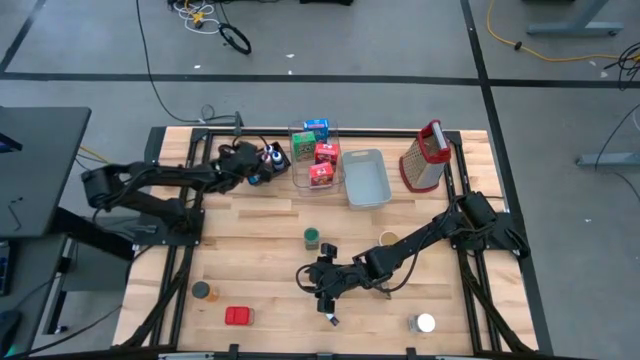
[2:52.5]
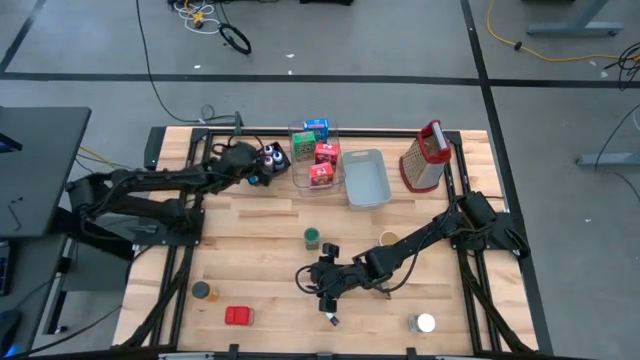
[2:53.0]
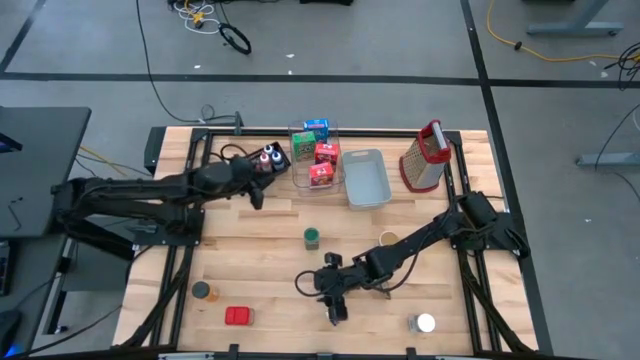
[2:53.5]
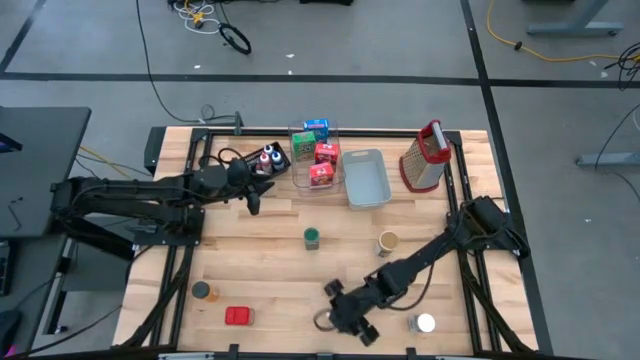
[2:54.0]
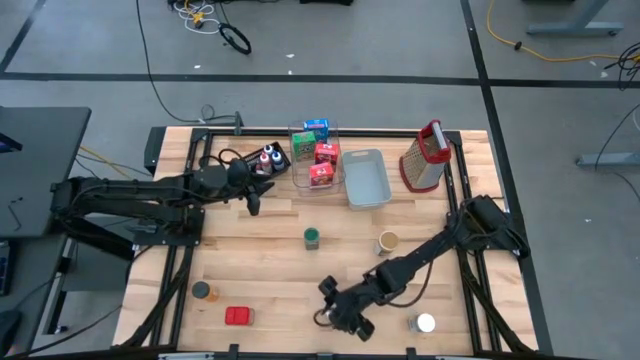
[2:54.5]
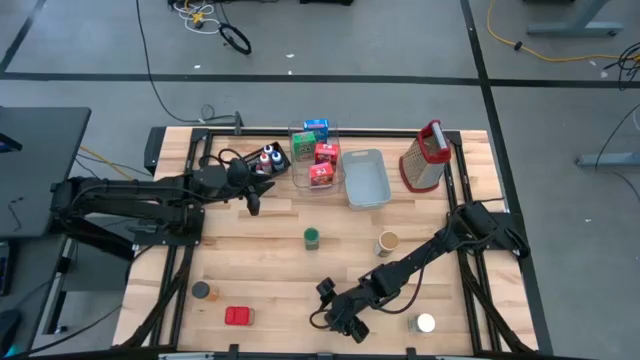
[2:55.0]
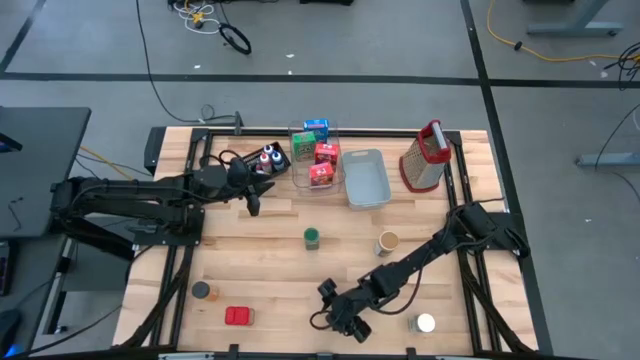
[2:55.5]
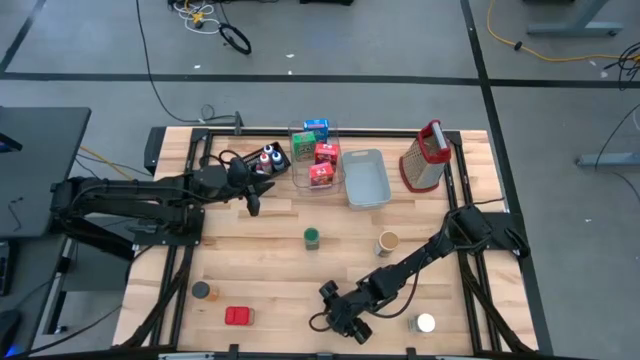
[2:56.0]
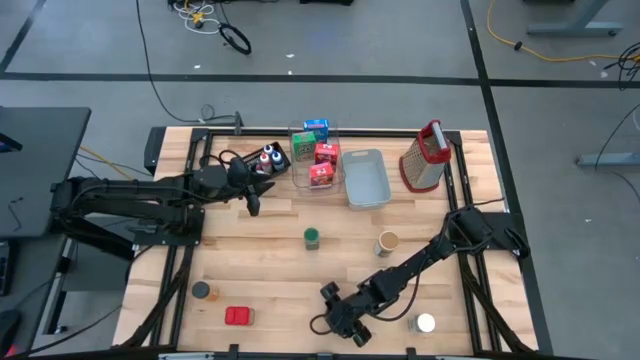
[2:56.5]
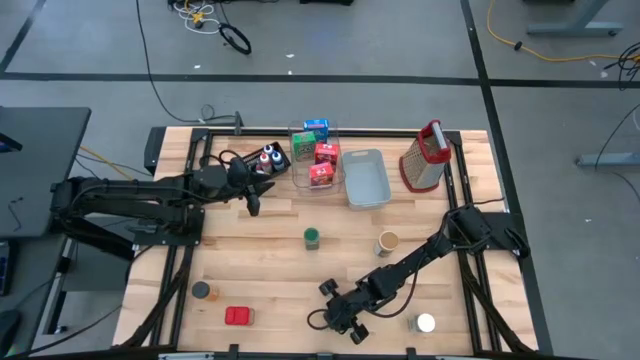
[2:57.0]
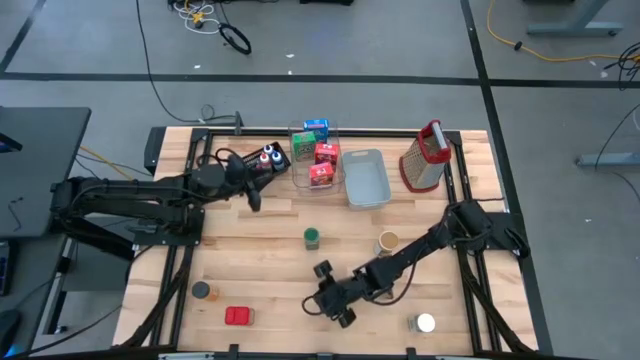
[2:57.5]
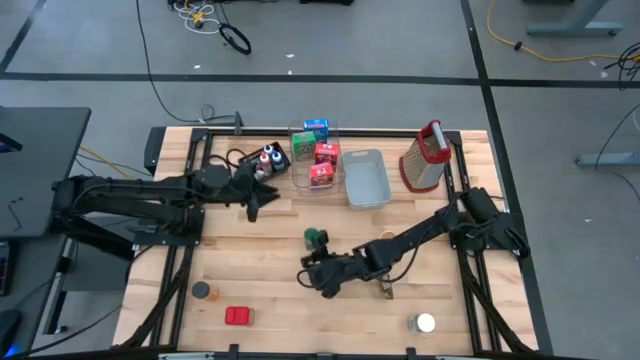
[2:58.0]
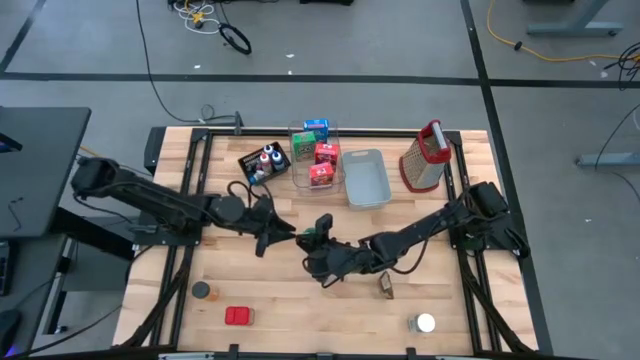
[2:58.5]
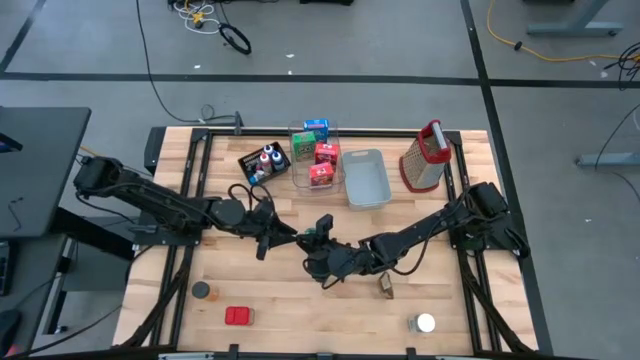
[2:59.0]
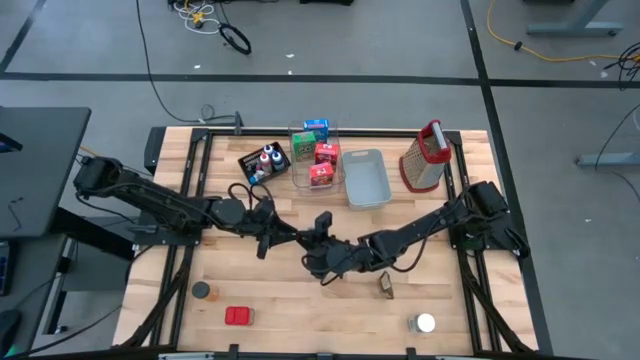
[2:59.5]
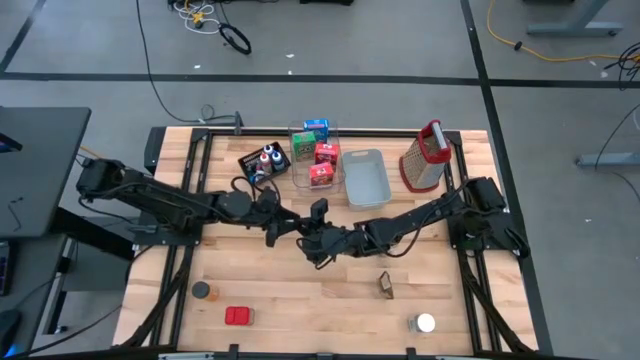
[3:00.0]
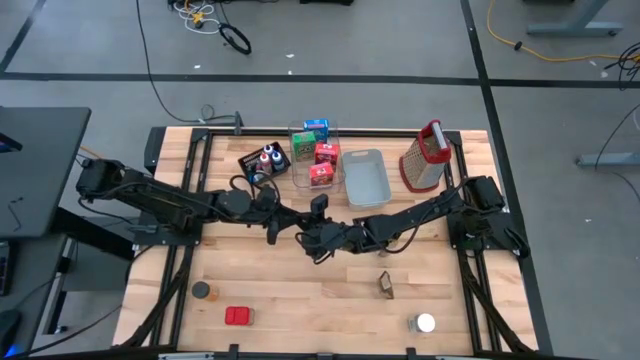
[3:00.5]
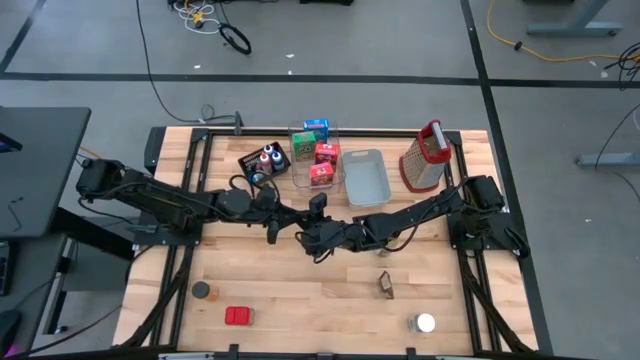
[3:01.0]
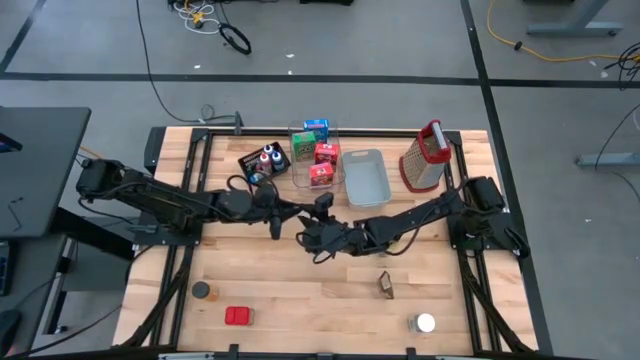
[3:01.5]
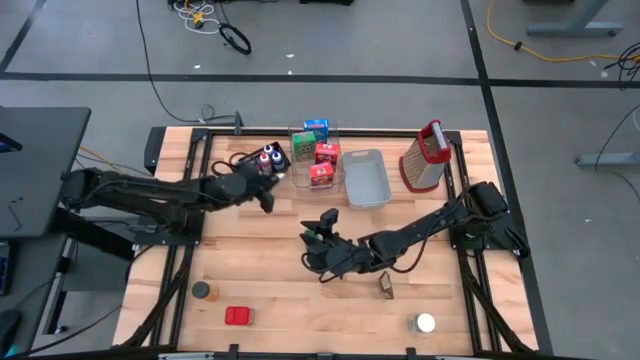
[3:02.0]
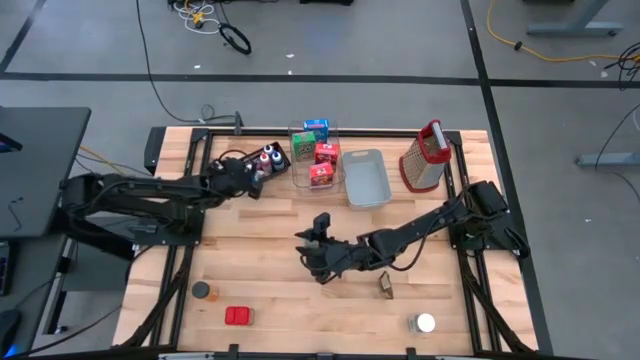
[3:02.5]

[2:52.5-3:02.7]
Task: Pick & Place Kitchen Items
Put the small red food coloring bottle into the black bin

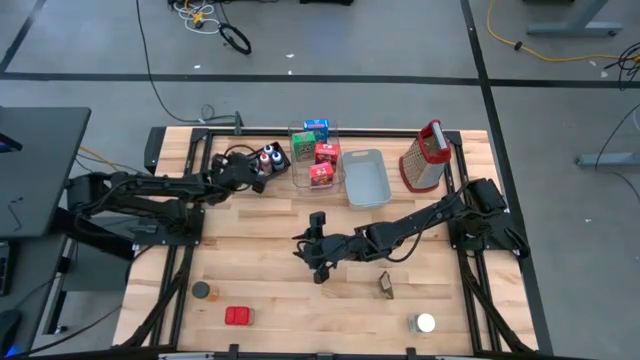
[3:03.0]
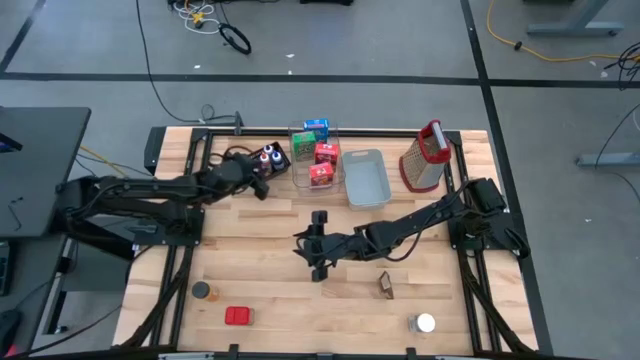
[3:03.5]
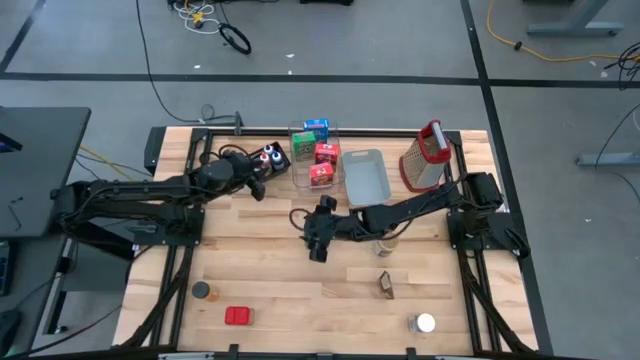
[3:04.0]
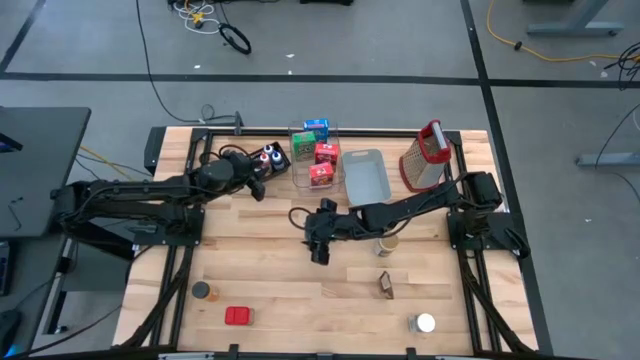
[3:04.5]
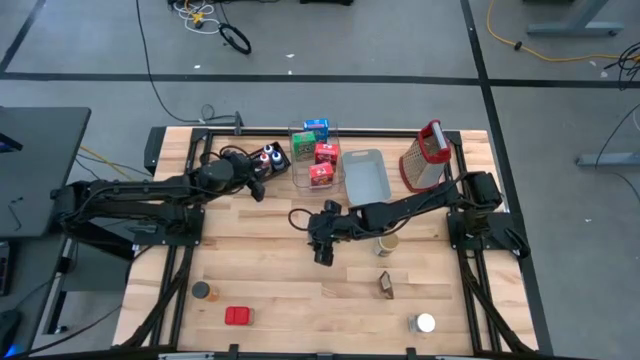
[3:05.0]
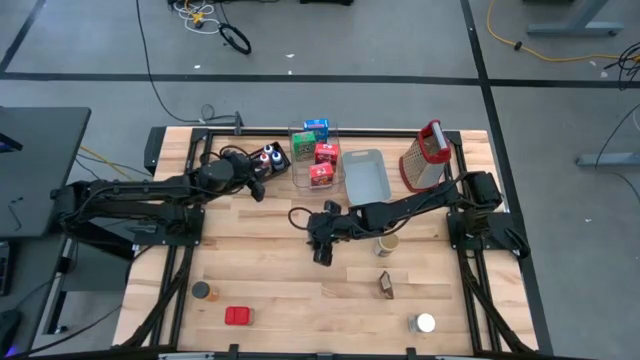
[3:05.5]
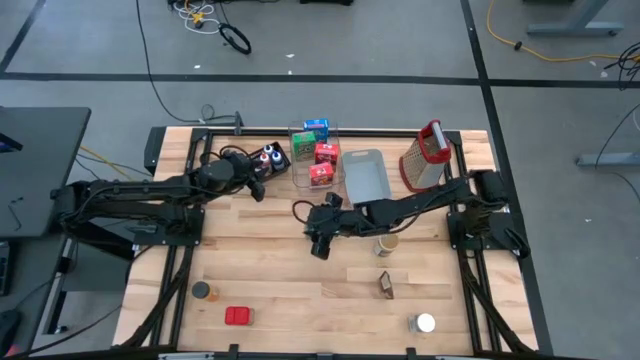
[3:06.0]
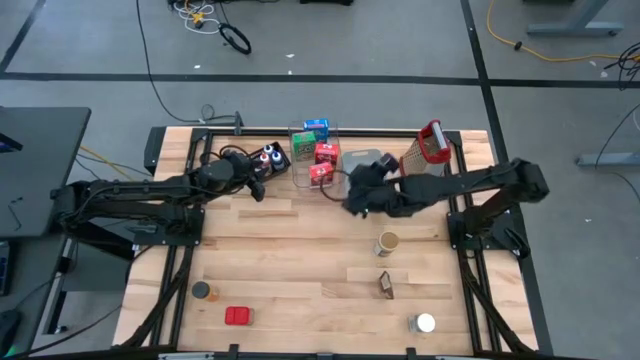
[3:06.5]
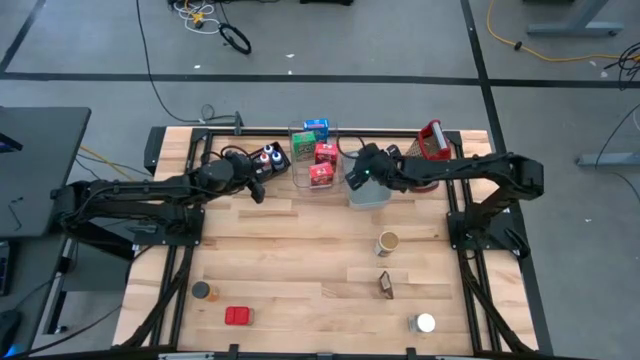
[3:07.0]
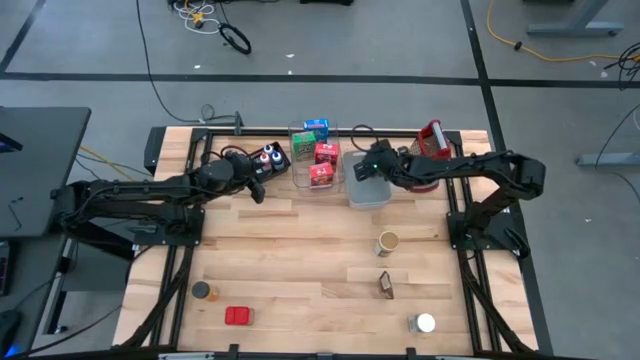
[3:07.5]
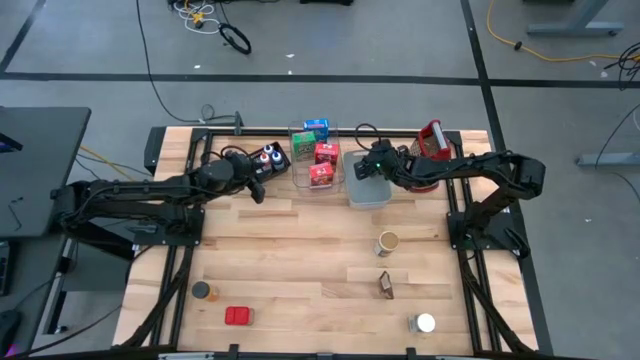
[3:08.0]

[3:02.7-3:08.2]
Put the green spice bottle into the gray bin

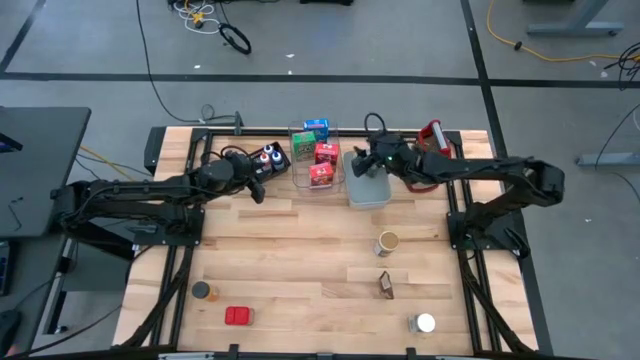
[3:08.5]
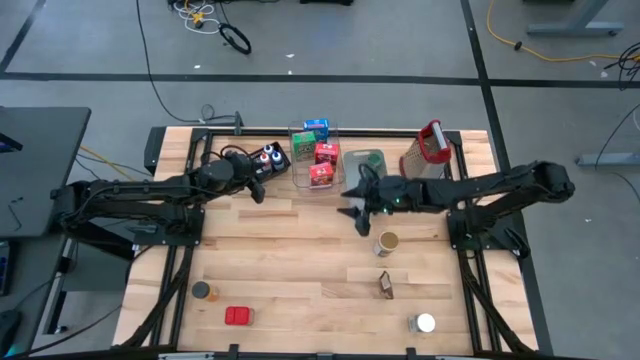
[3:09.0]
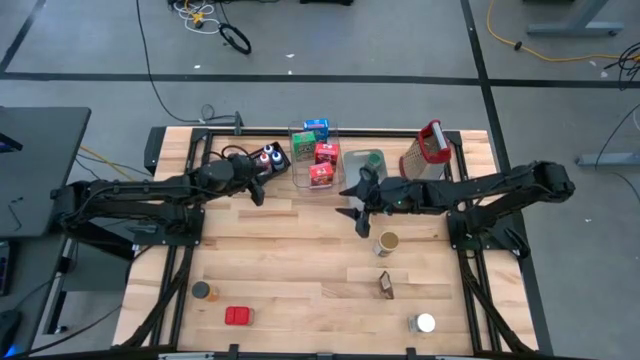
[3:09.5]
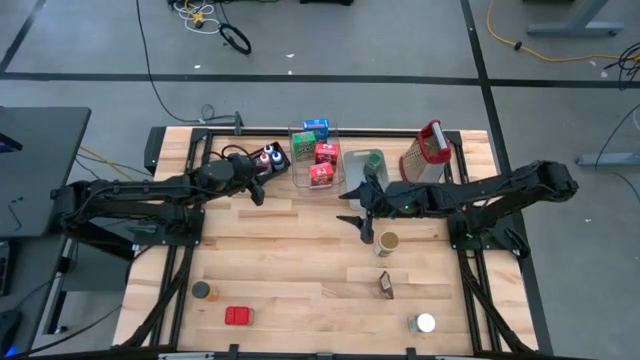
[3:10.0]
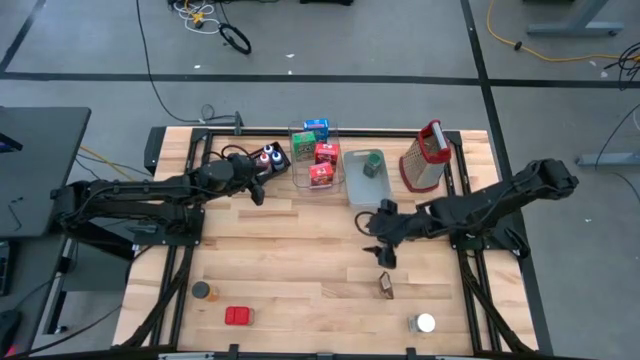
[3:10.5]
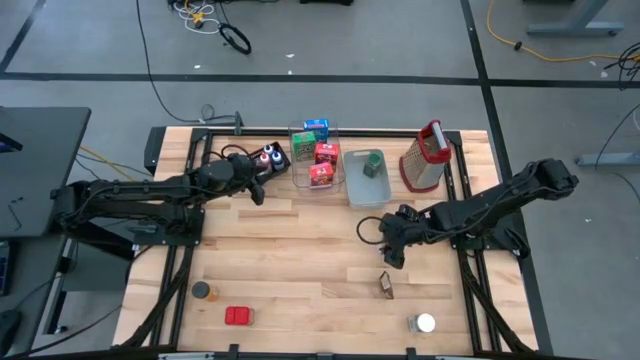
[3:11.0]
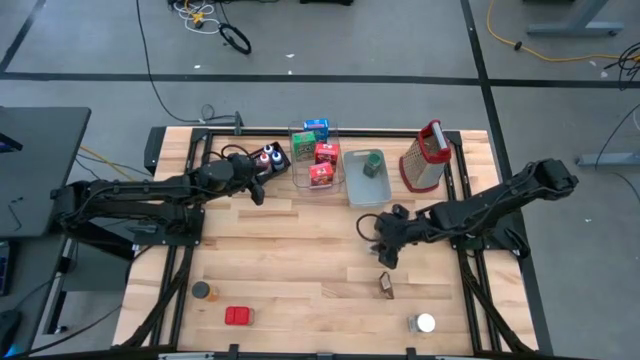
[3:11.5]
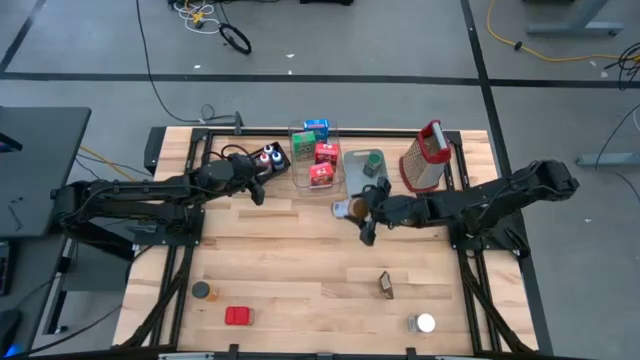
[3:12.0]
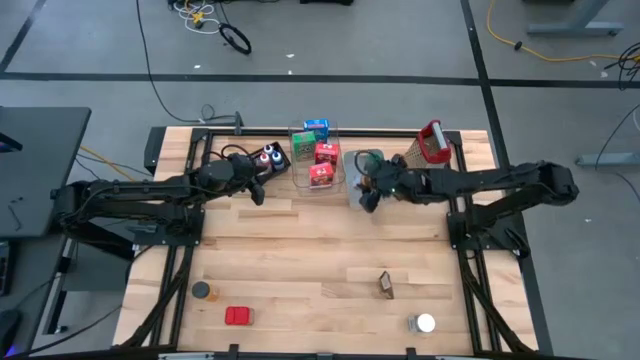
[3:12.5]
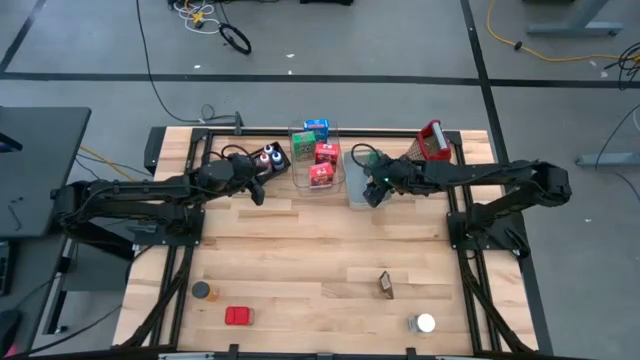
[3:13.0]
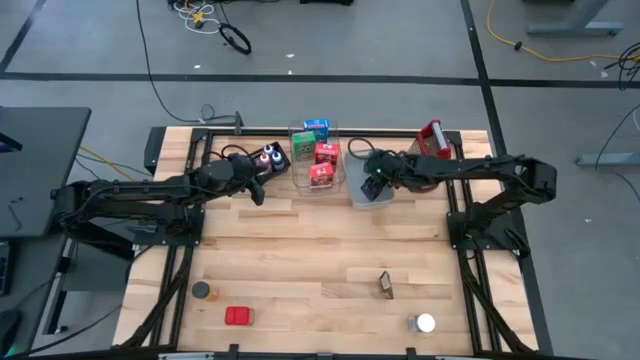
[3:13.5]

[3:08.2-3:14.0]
Put the brown spice bottle into the gray bin
